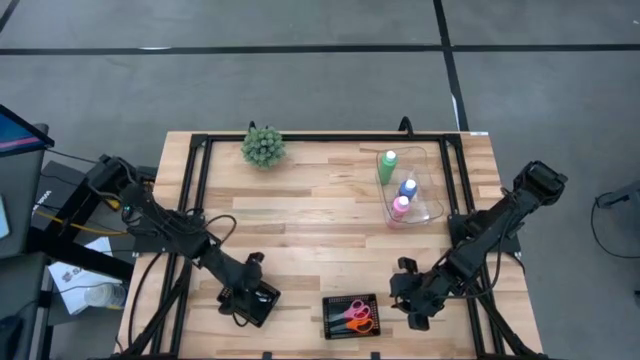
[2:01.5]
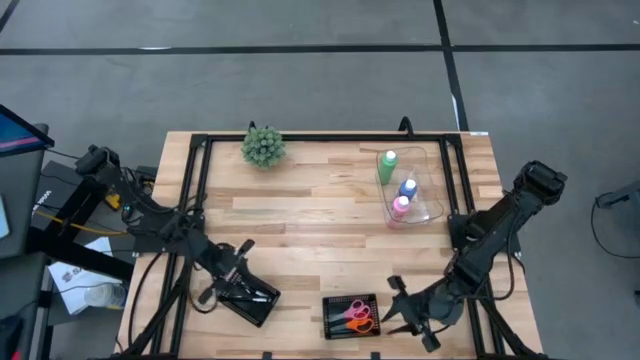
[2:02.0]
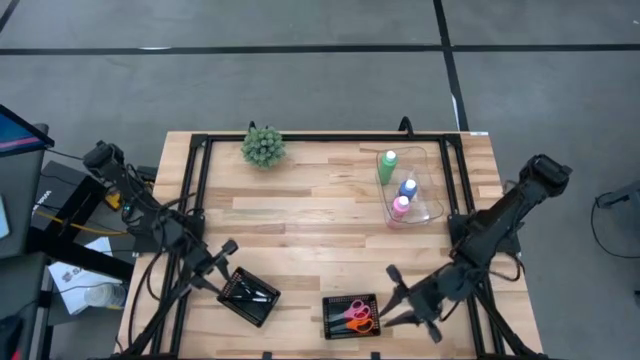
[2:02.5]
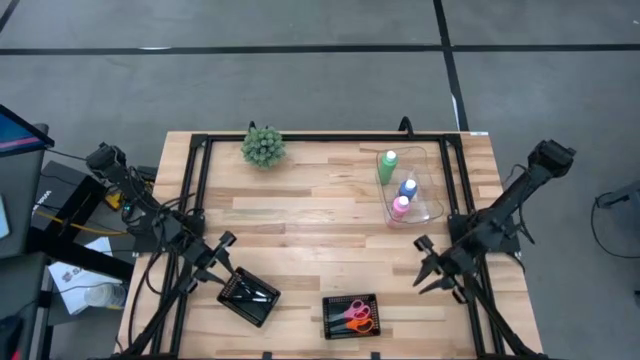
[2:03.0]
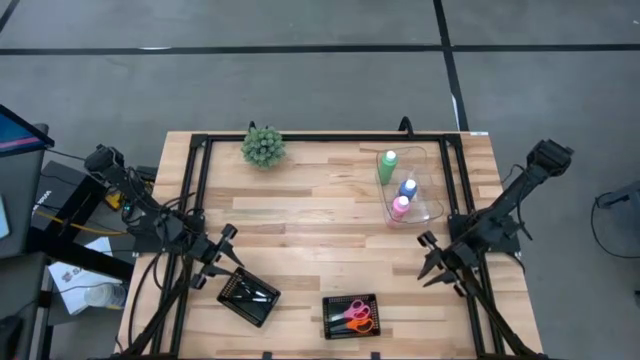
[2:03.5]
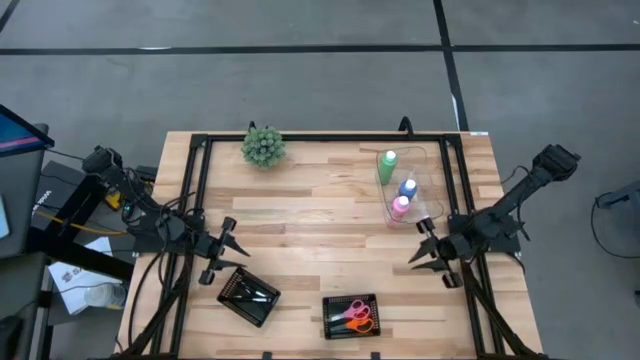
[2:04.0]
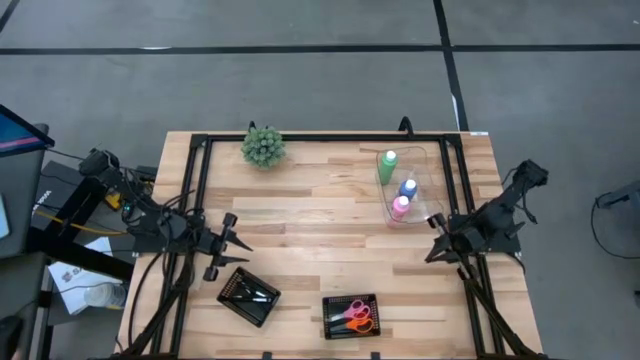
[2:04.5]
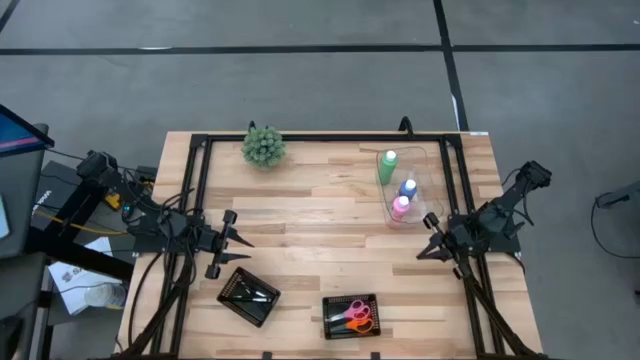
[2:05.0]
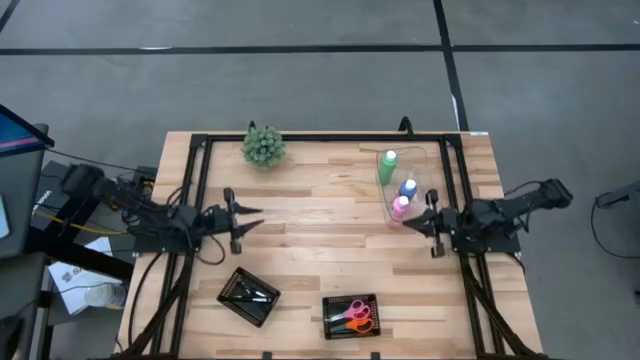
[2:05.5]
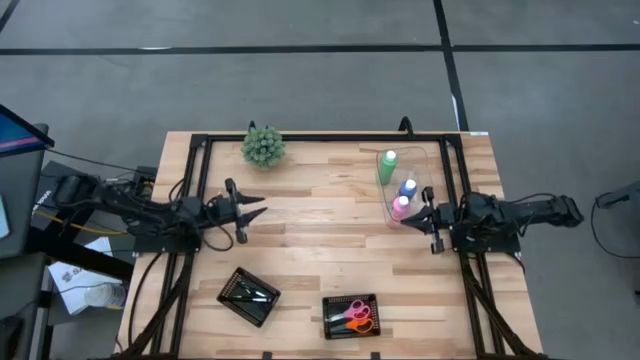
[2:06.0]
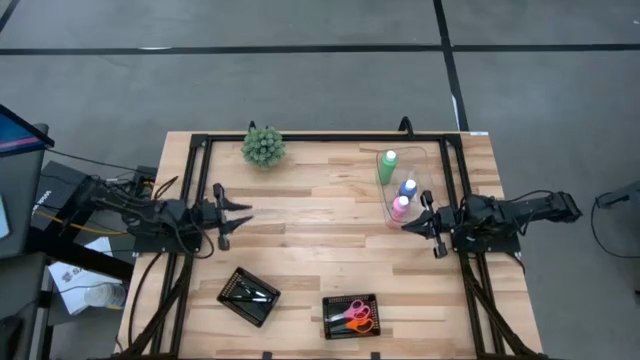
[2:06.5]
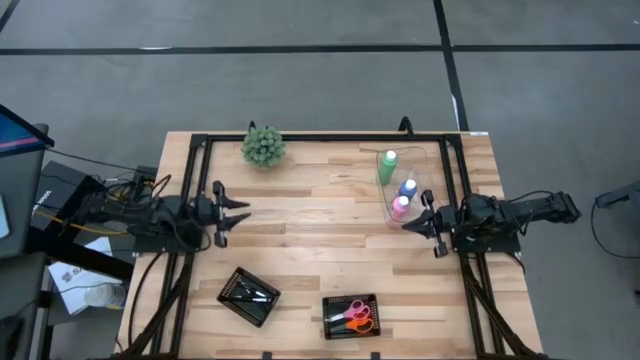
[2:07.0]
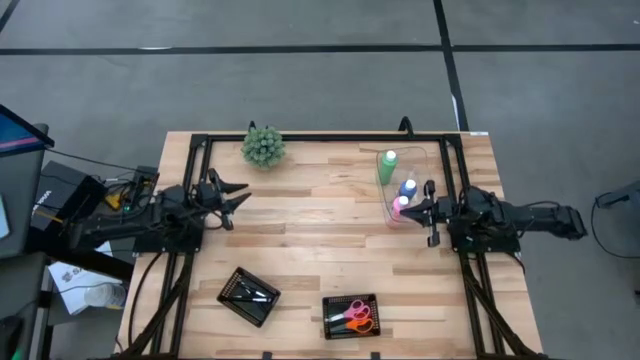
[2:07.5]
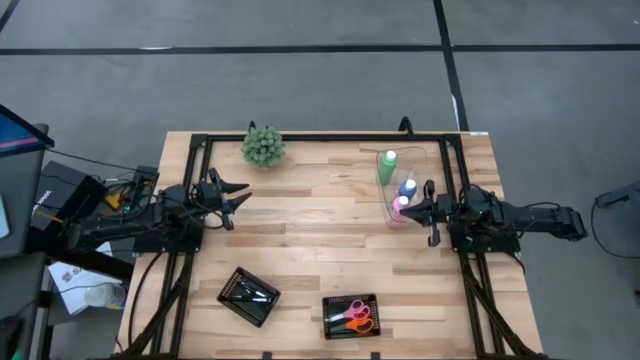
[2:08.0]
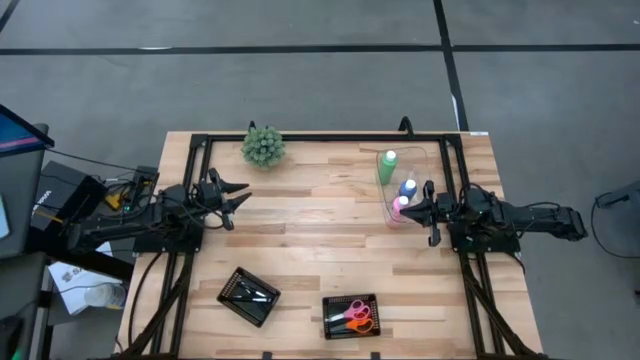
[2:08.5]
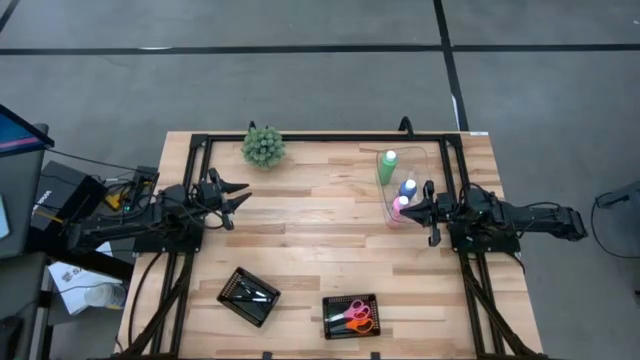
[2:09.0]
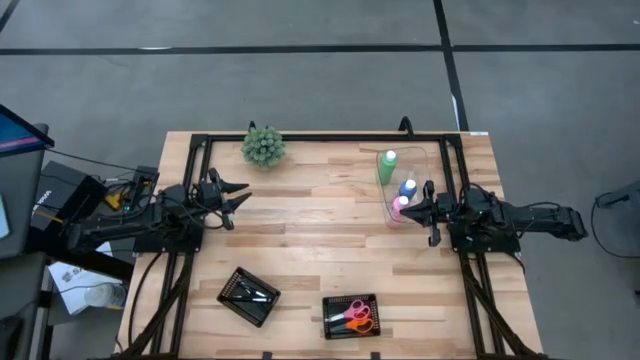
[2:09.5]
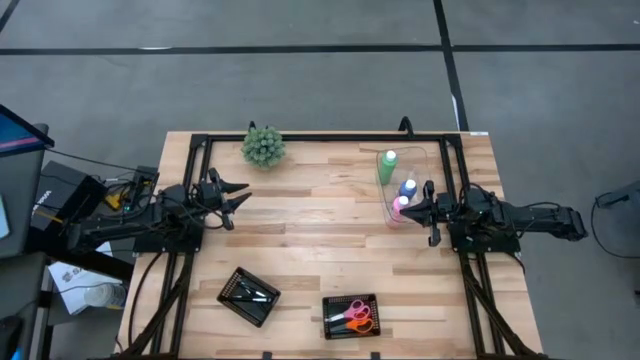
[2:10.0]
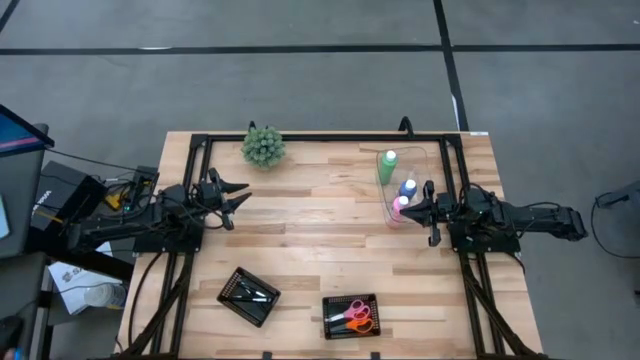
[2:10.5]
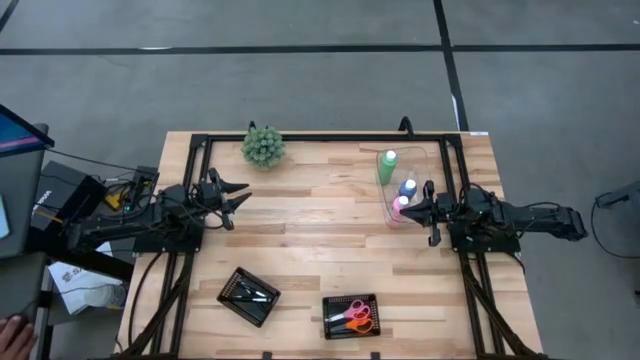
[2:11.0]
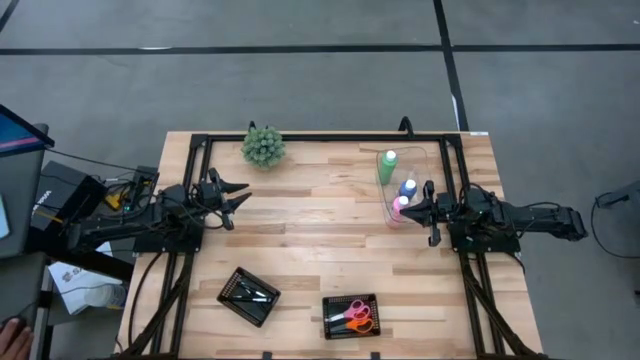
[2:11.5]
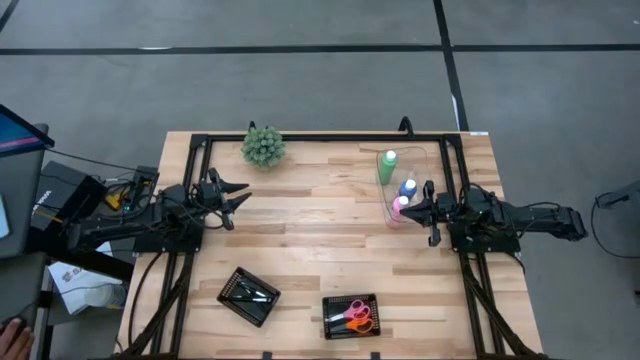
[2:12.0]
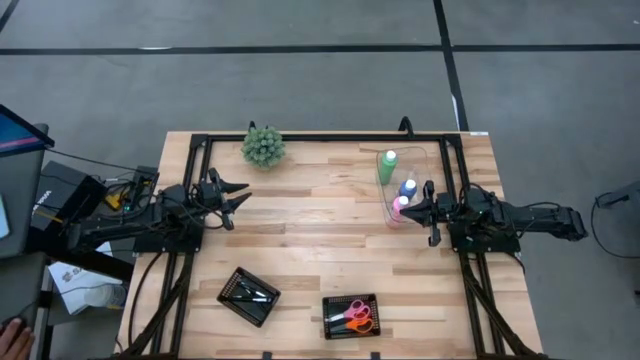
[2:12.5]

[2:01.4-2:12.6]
Task: Pick & Place Paint Supplies
Return to Home Position

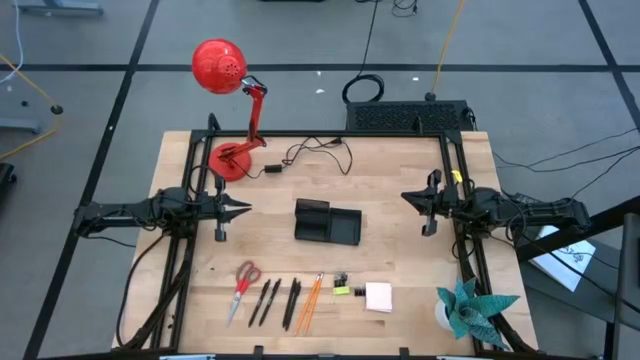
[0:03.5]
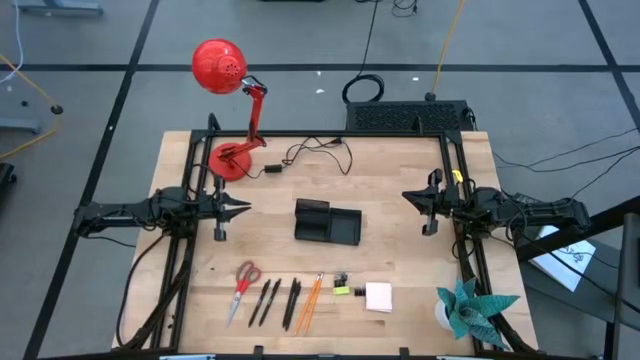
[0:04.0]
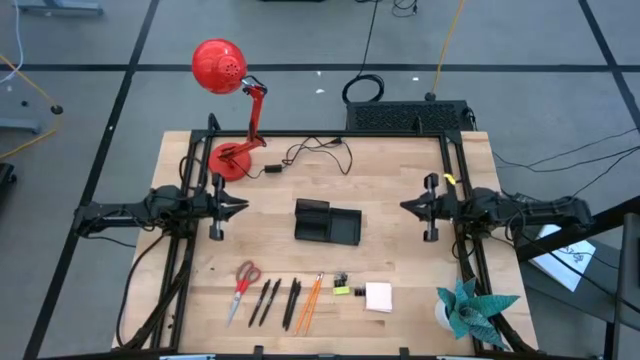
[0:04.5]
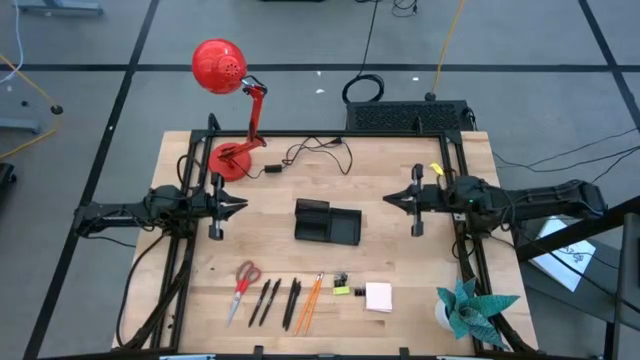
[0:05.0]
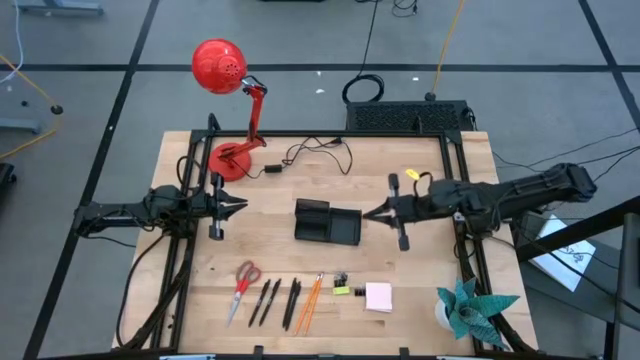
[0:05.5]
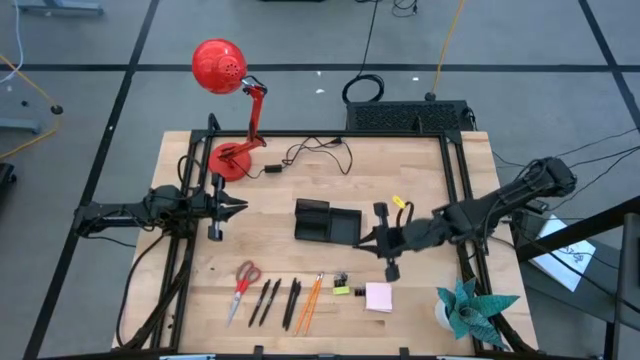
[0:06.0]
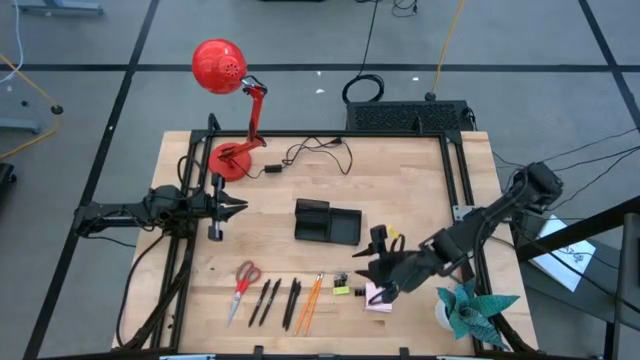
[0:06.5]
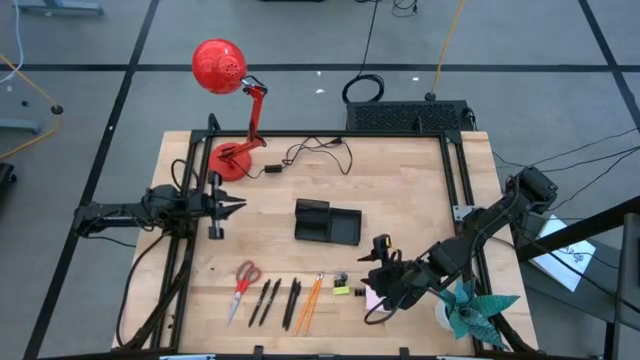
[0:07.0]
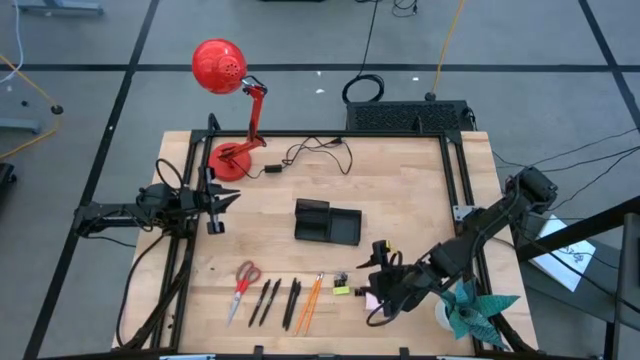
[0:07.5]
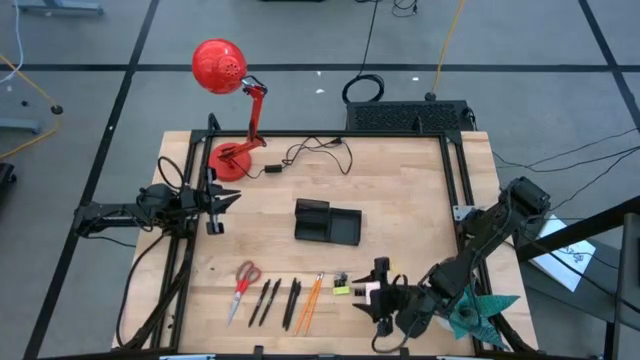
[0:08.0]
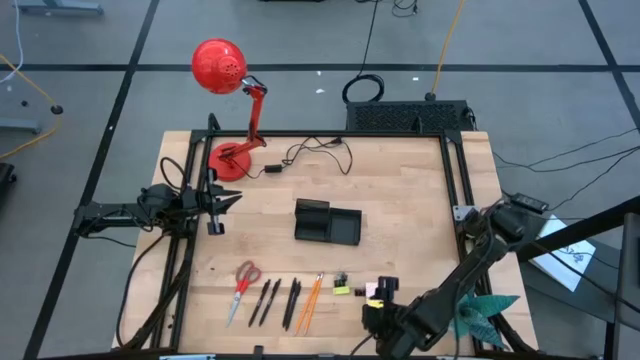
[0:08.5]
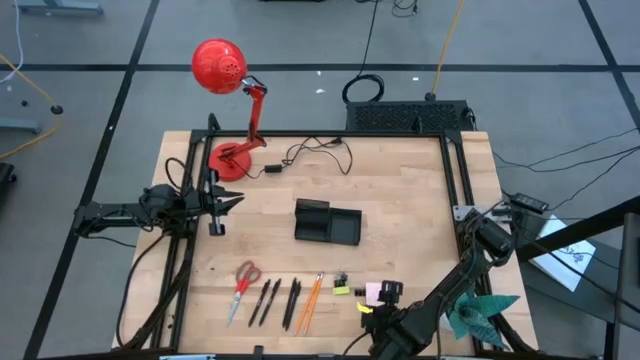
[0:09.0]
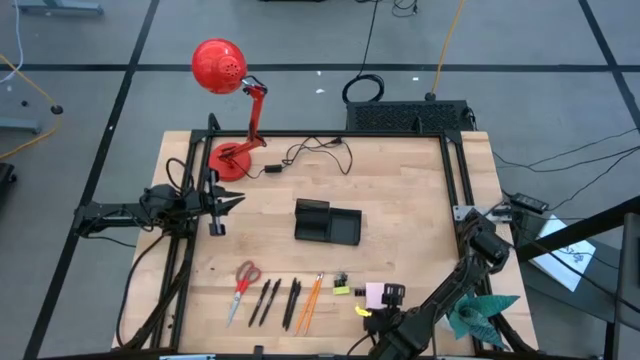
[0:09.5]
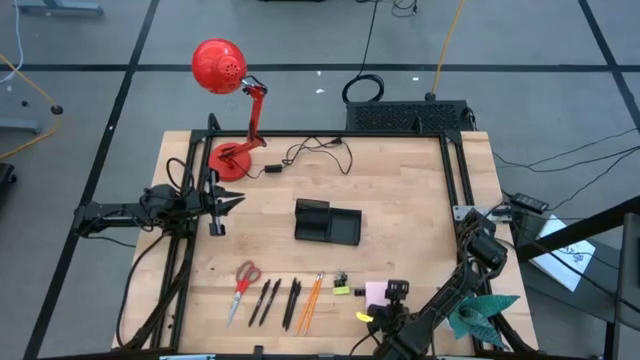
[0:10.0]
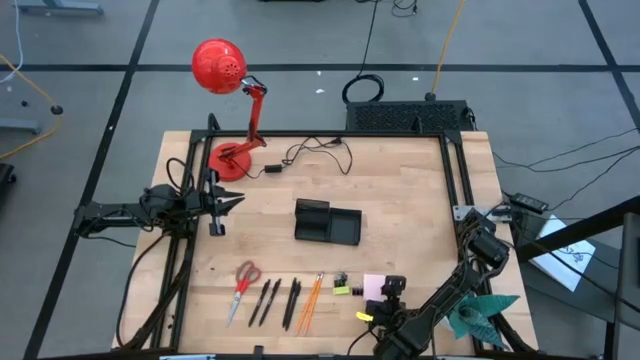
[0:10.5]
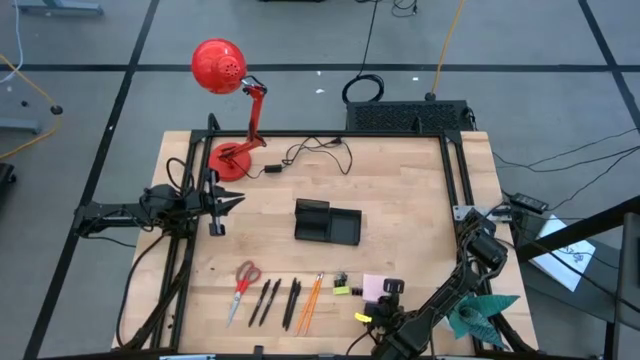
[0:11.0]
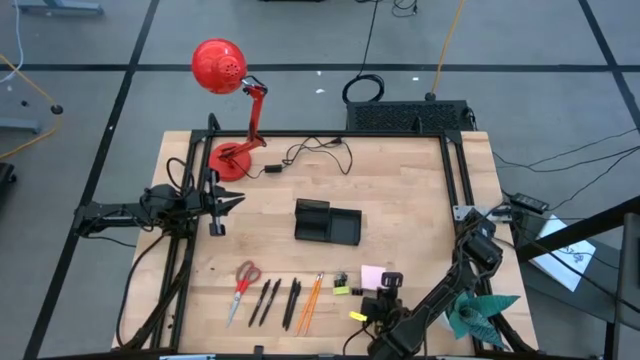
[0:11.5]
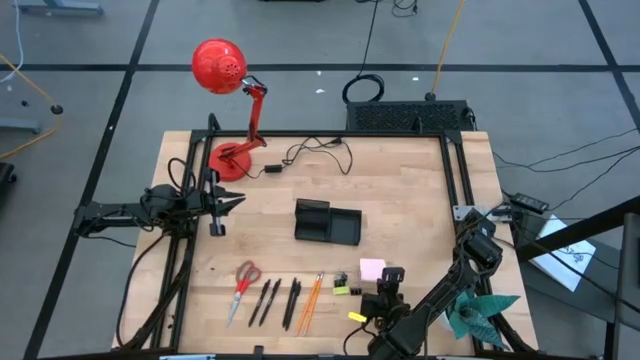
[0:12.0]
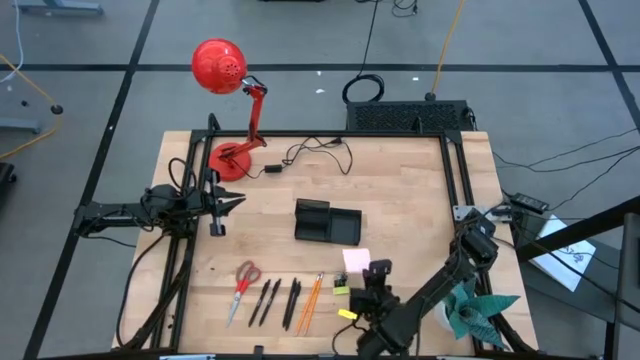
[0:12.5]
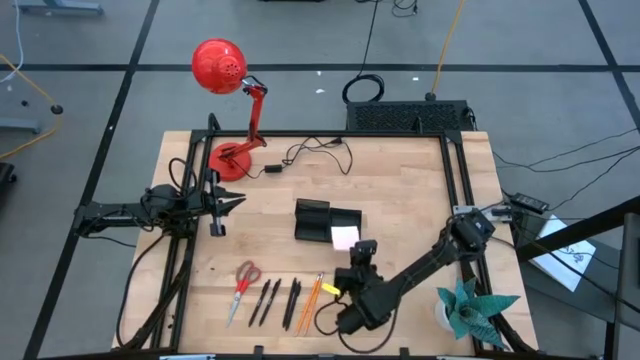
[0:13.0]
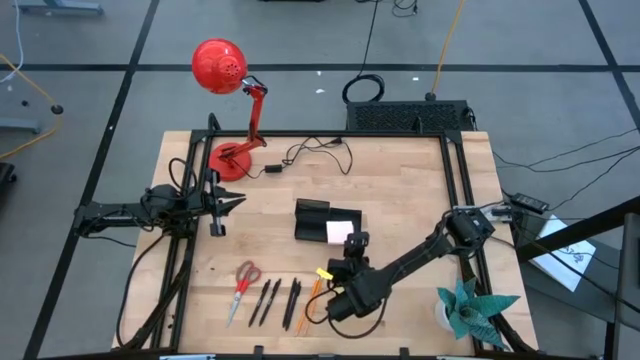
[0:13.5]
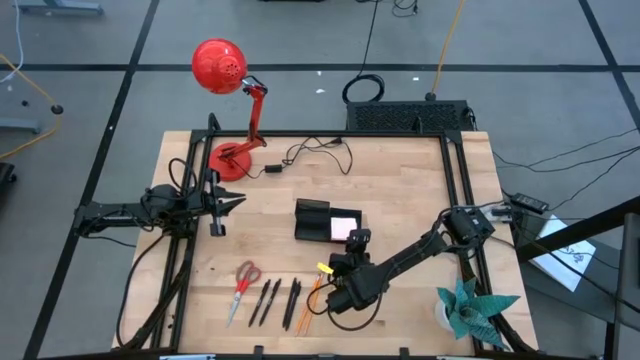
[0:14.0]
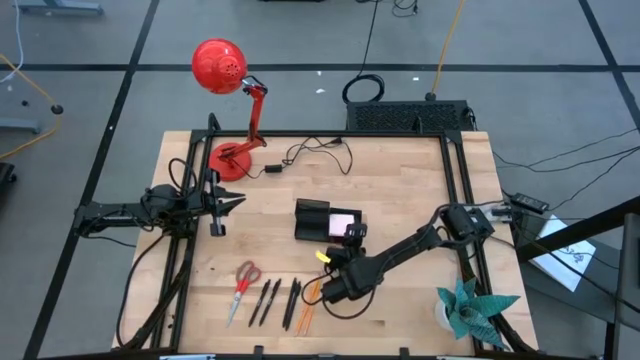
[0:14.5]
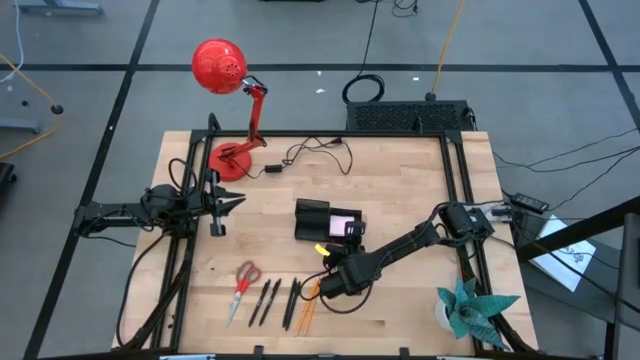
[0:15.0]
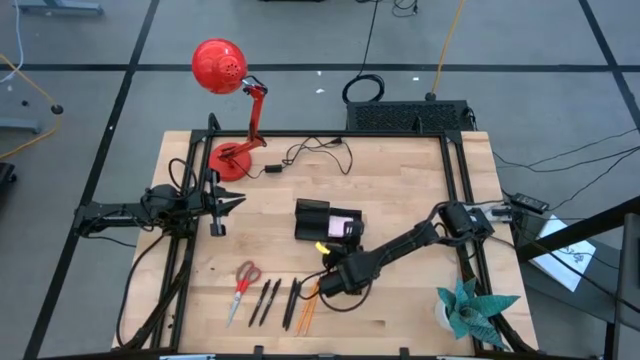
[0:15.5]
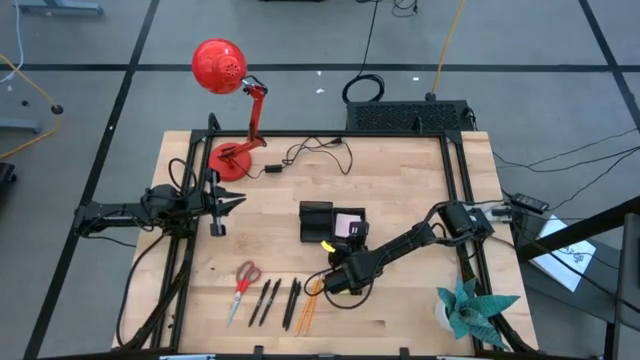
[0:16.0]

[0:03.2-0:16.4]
Task: Pick and place office supplies into organizer
Put the pink sticky notes into the desk organizer
